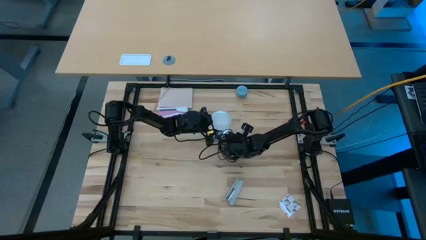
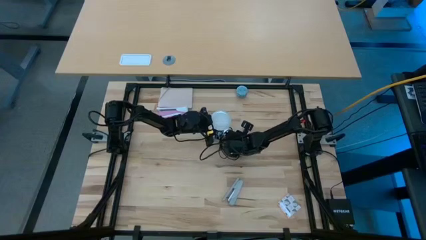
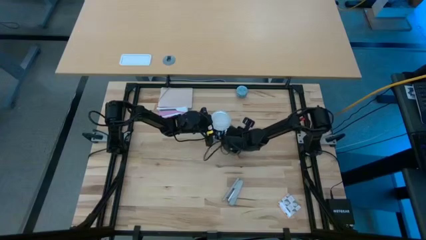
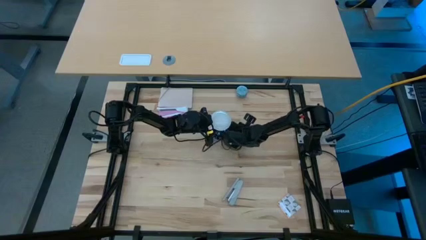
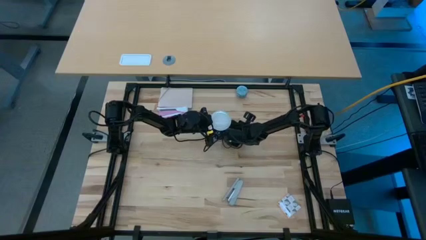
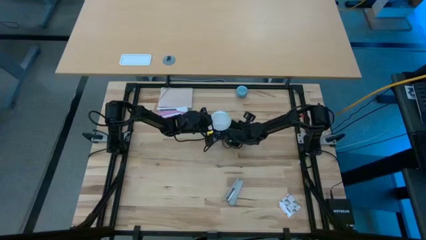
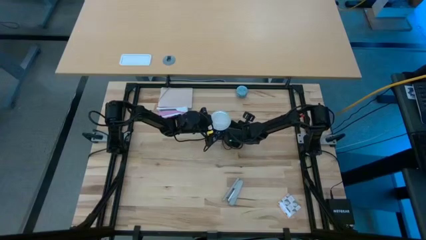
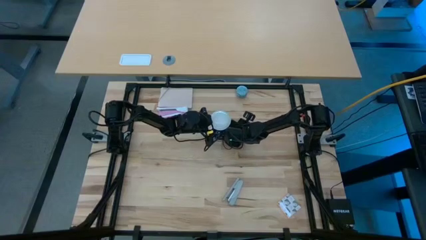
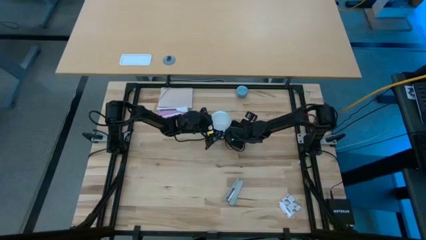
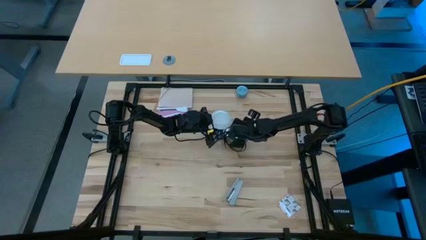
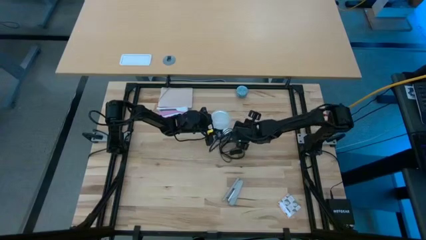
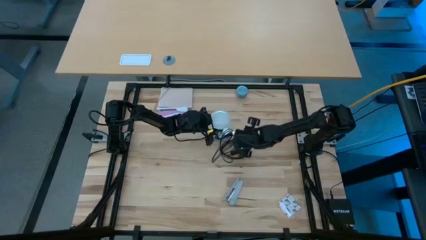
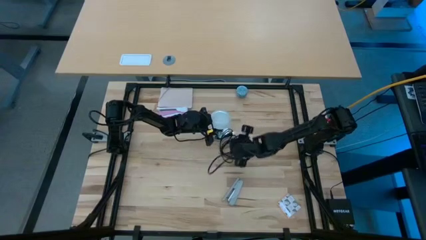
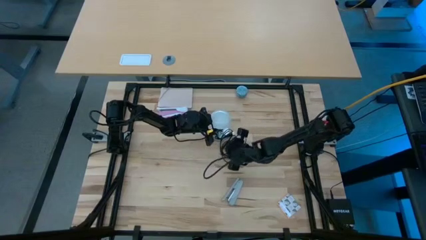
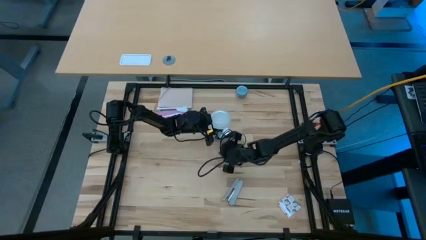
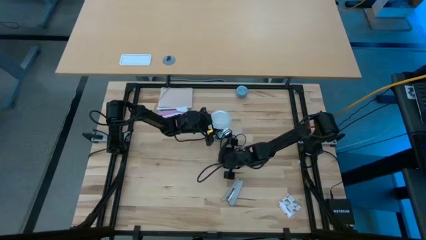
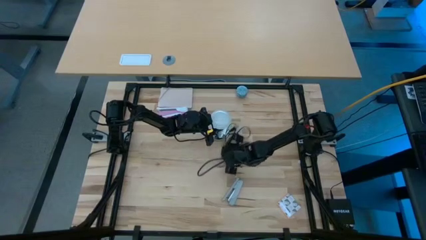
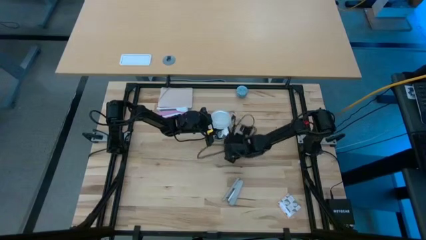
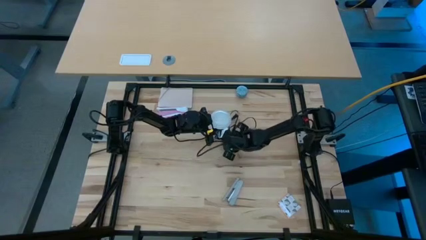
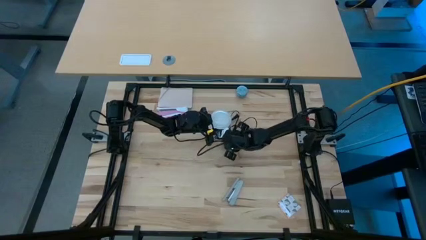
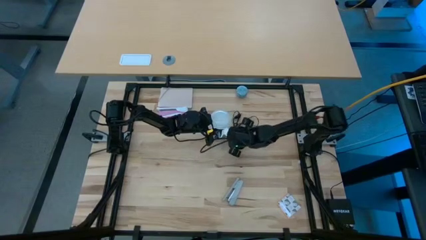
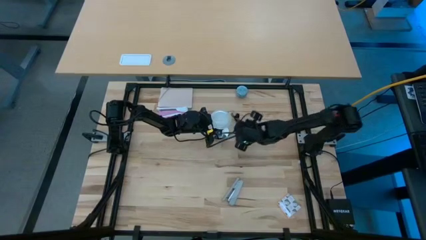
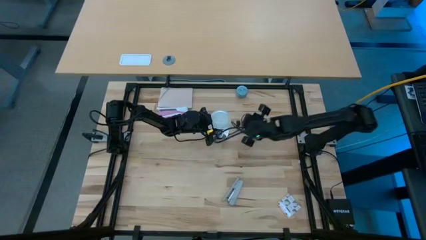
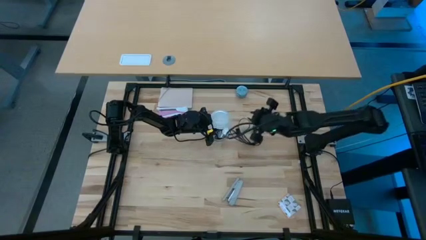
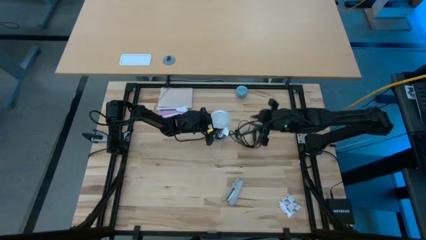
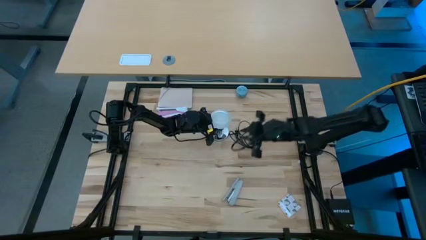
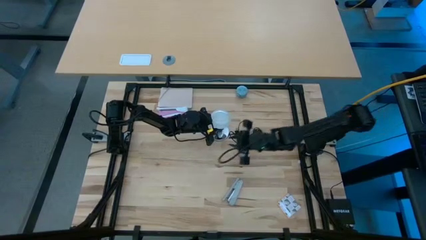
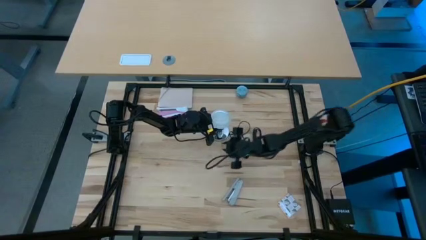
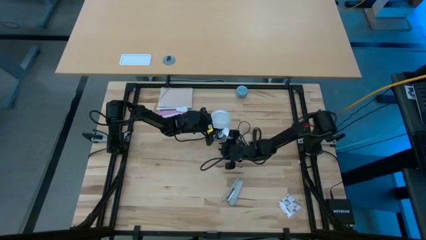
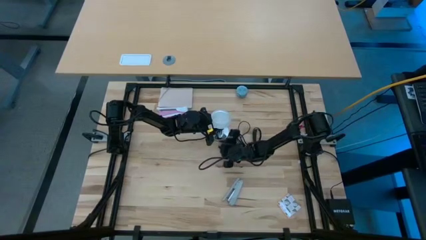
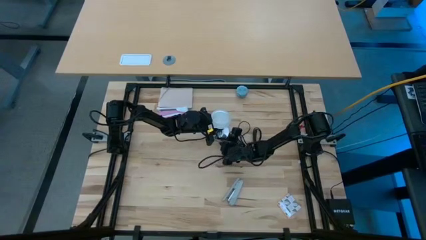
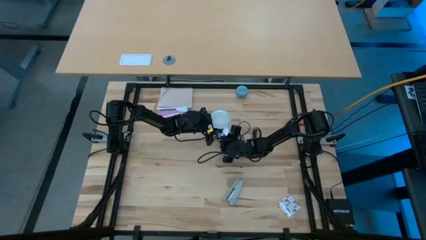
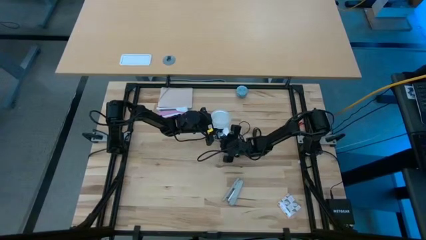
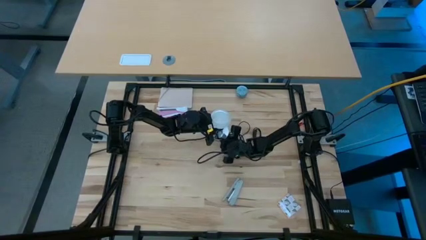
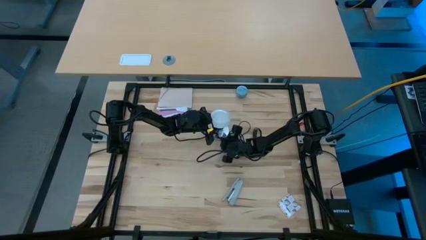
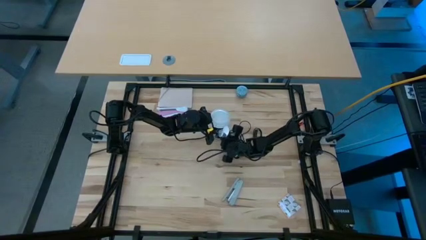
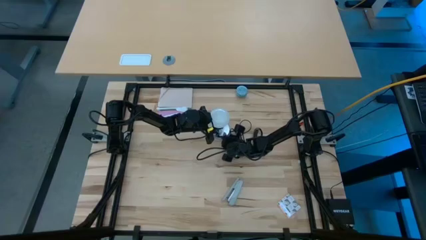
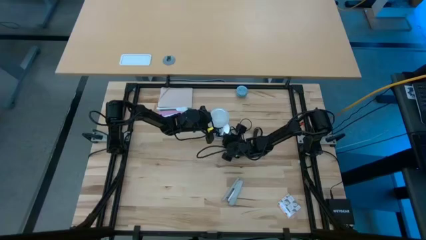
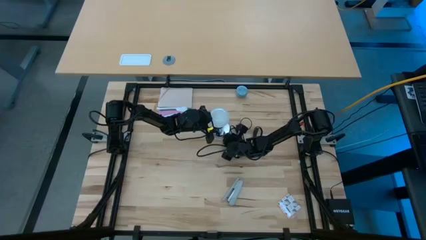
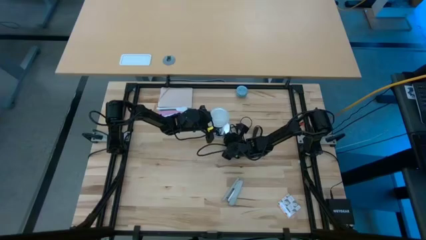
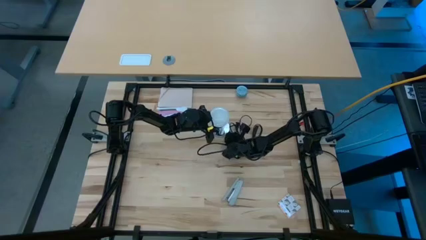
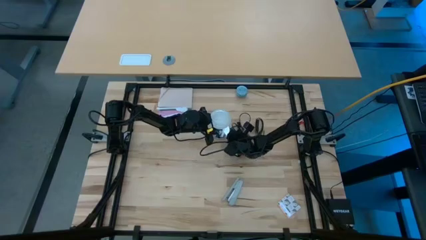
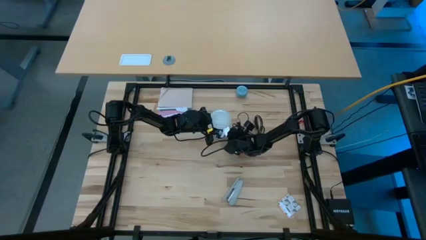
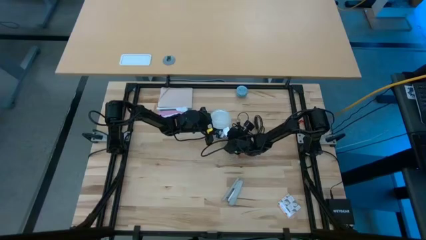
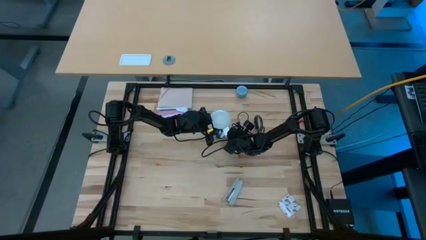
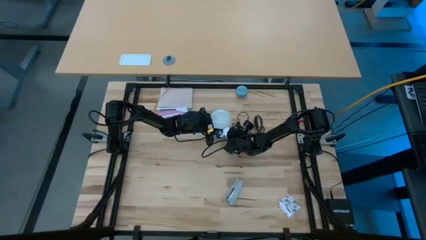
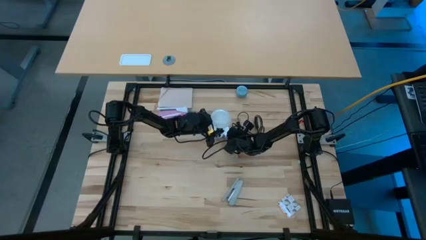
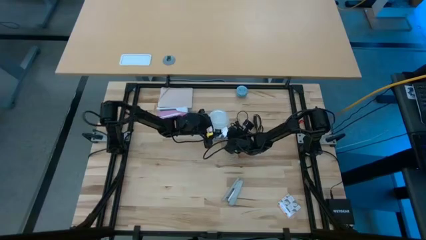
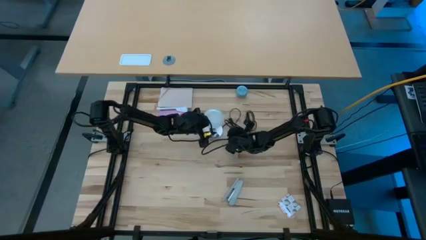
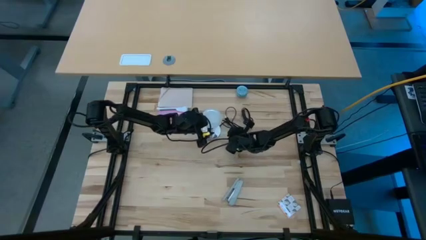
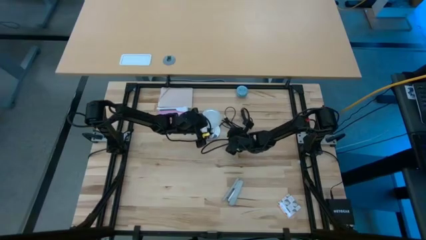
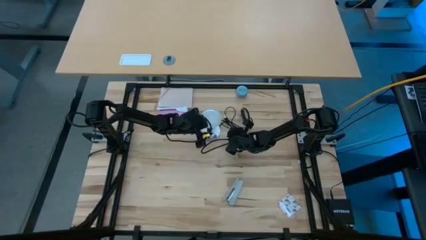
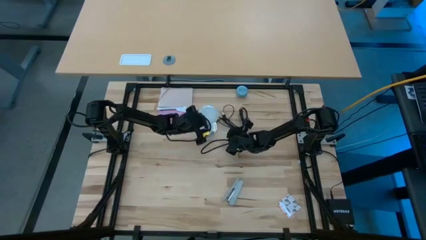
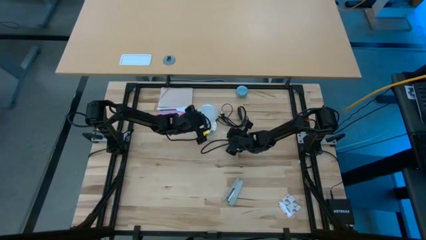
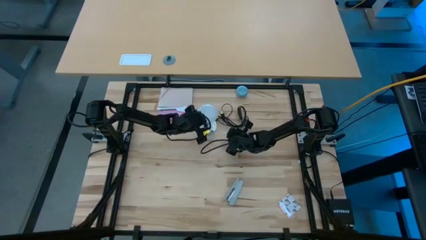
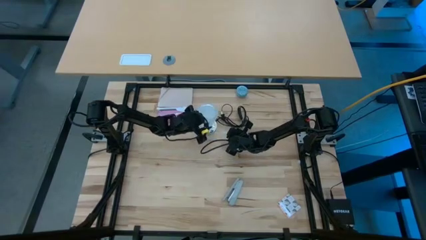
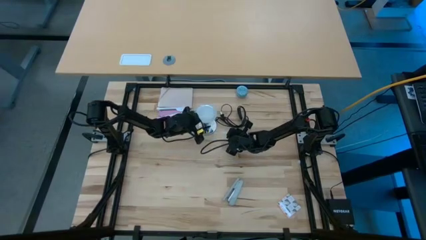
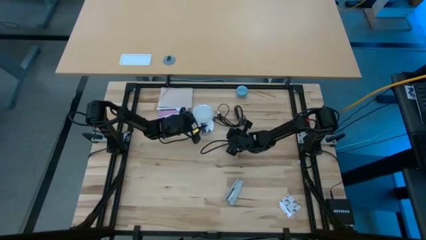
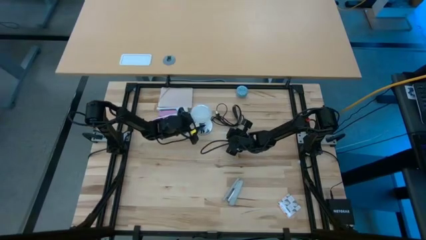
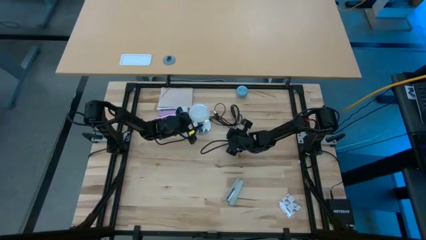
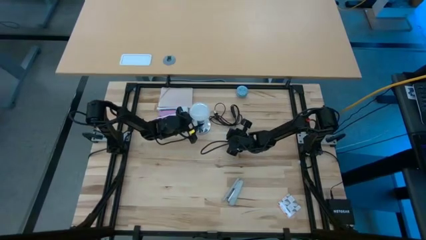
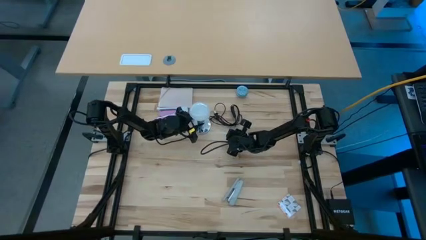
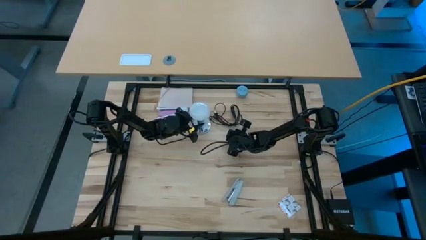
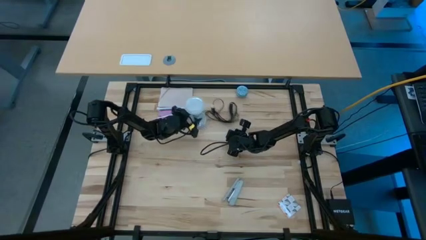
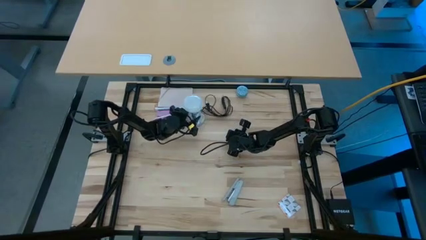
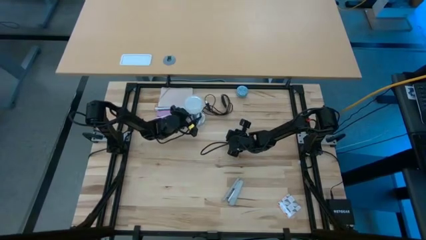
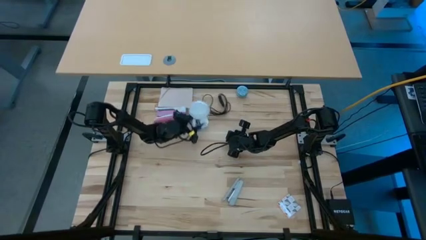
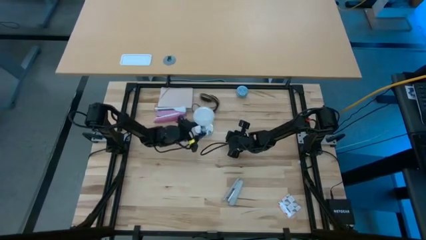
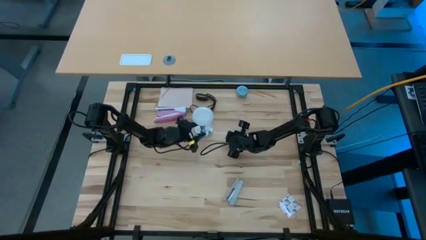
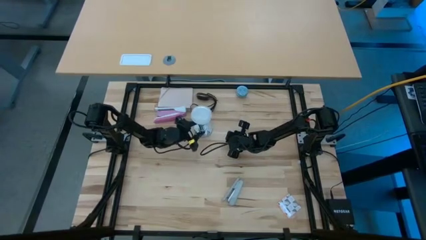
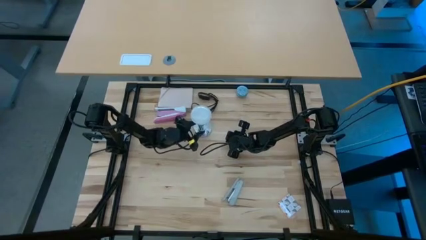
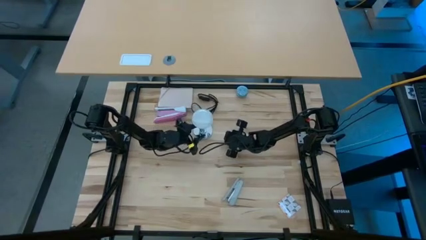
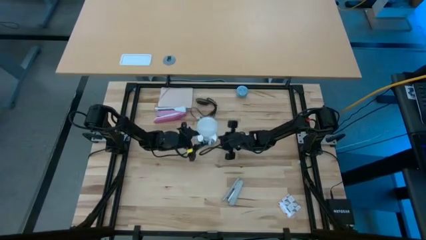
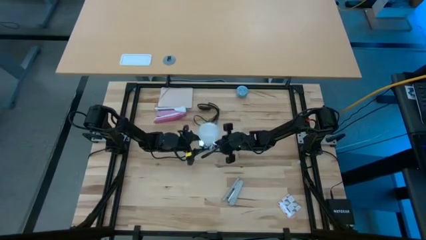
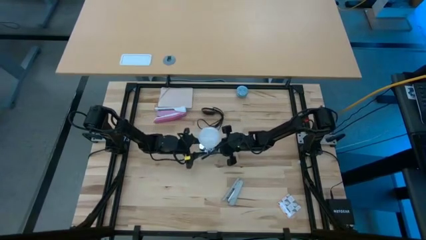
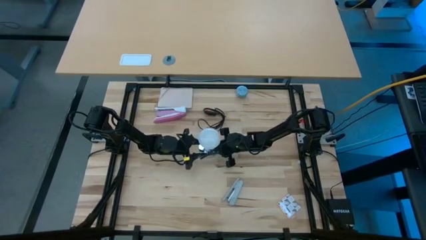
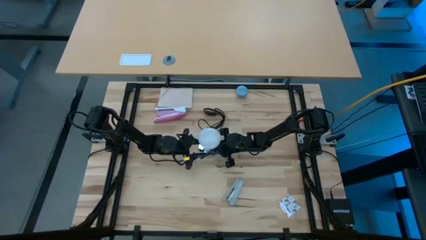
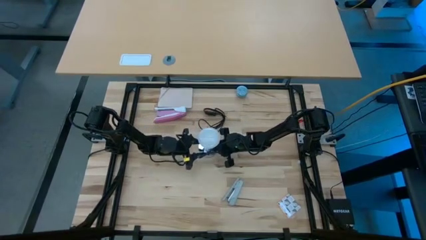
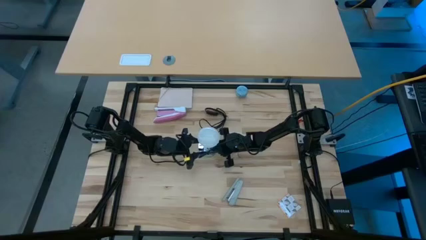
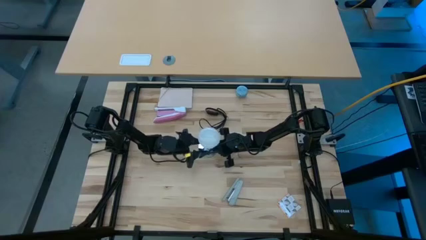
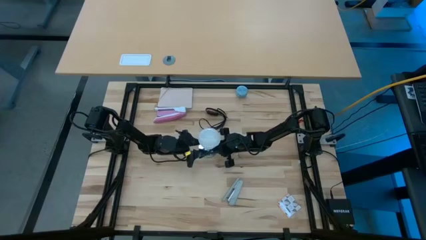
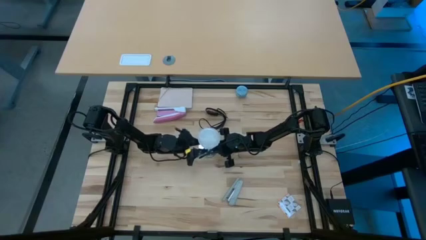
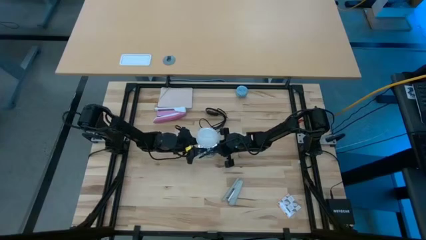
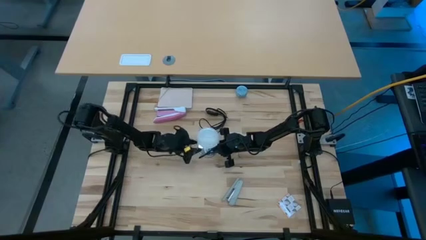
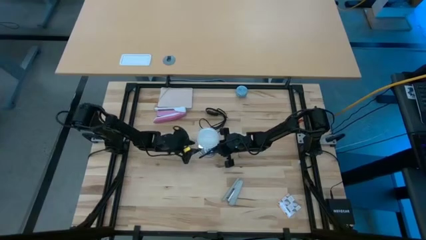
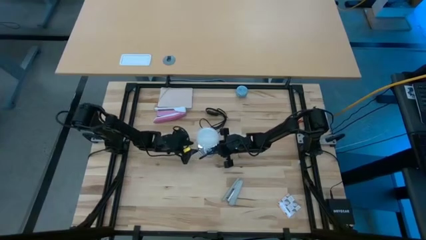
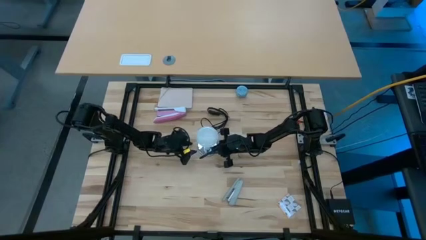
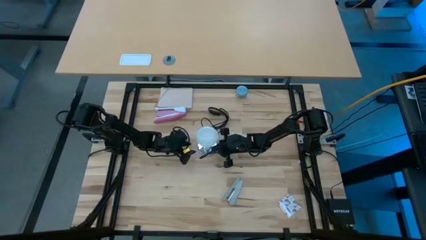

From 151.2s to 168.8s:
Task: Screw lightbulb
Insert light bulb into the lamp
